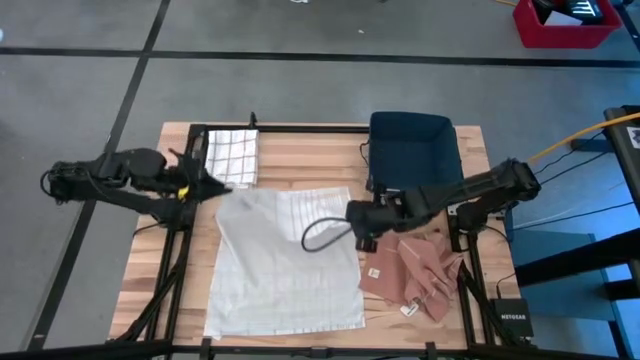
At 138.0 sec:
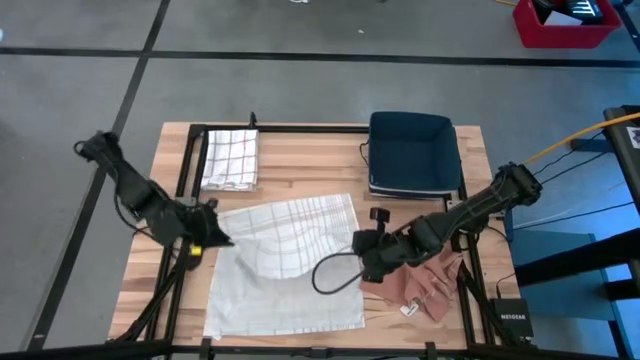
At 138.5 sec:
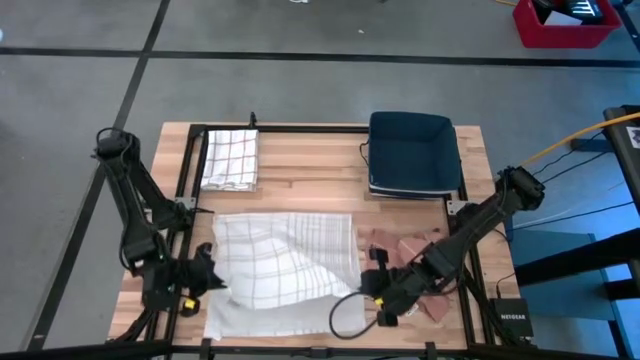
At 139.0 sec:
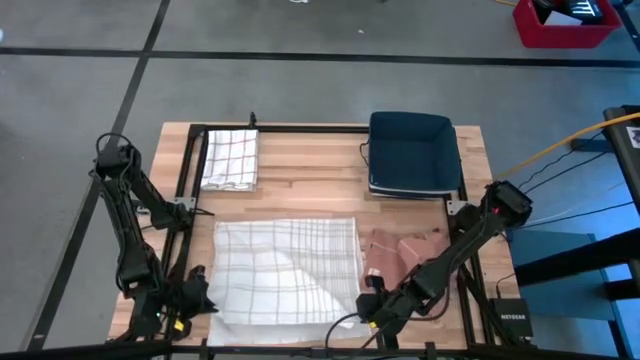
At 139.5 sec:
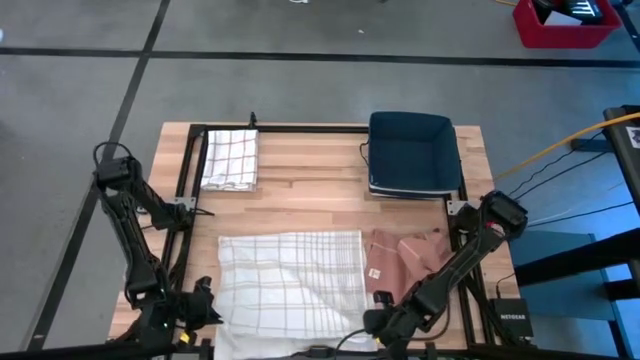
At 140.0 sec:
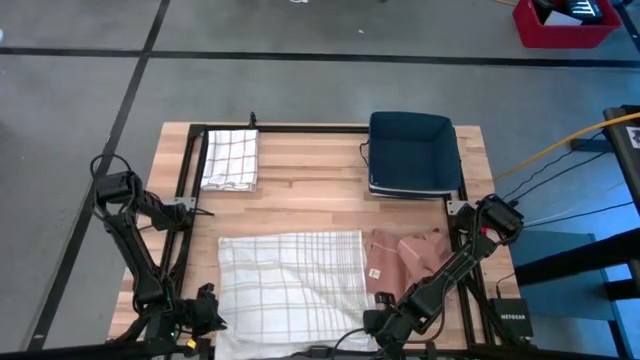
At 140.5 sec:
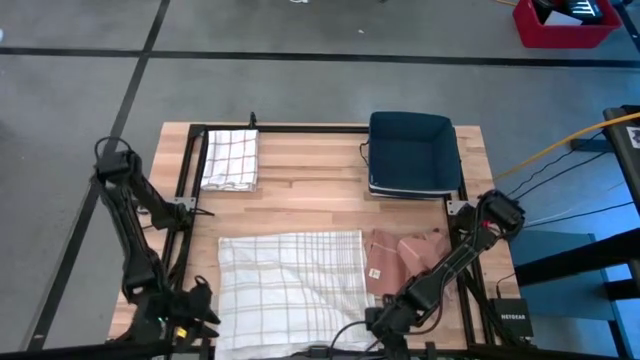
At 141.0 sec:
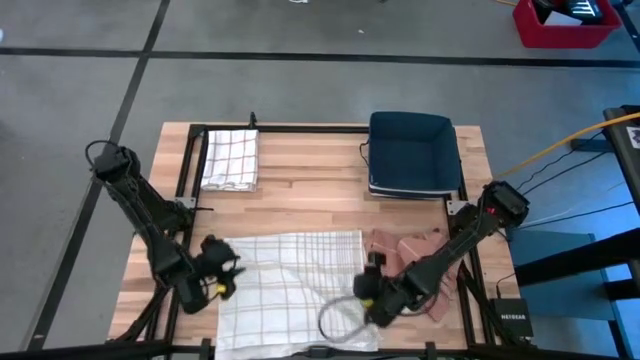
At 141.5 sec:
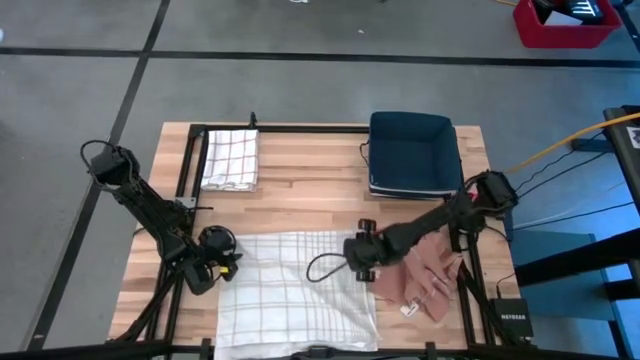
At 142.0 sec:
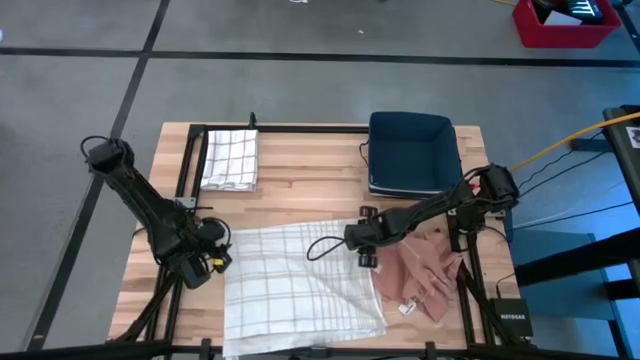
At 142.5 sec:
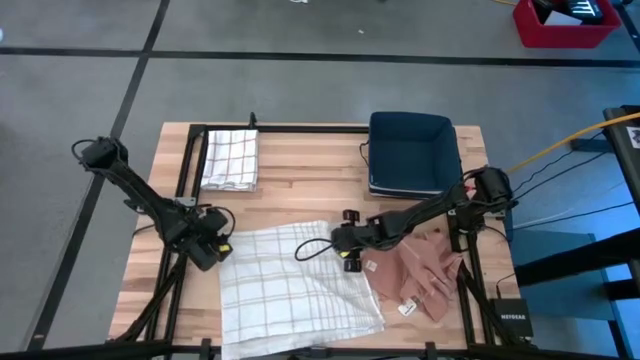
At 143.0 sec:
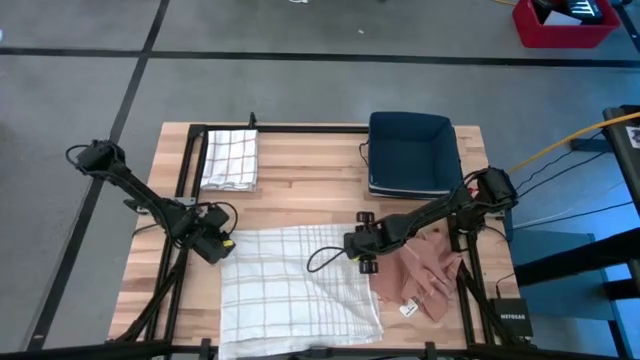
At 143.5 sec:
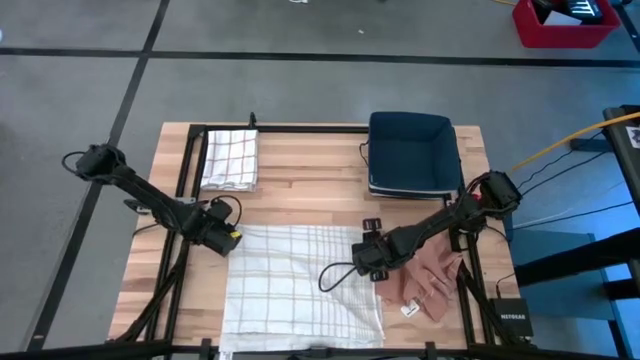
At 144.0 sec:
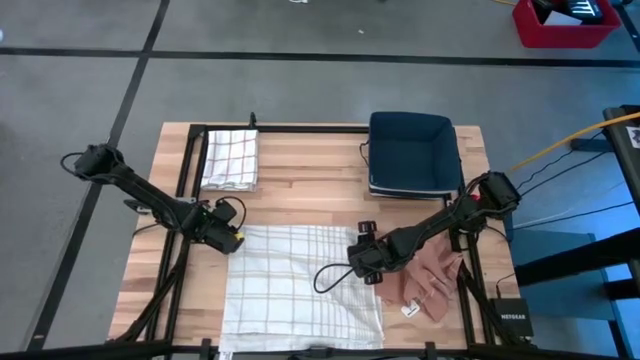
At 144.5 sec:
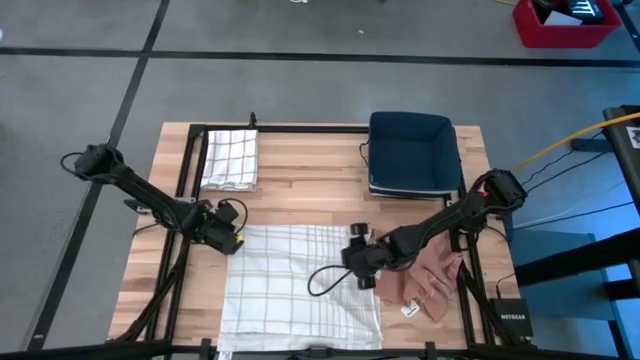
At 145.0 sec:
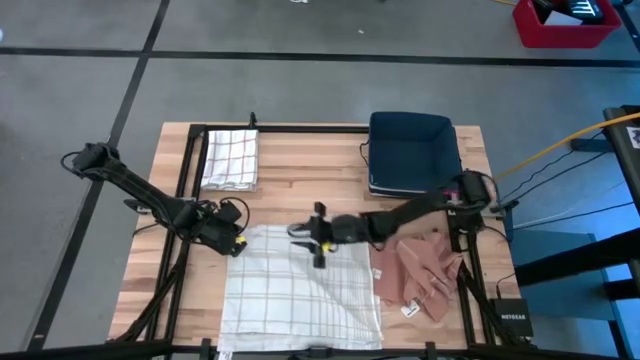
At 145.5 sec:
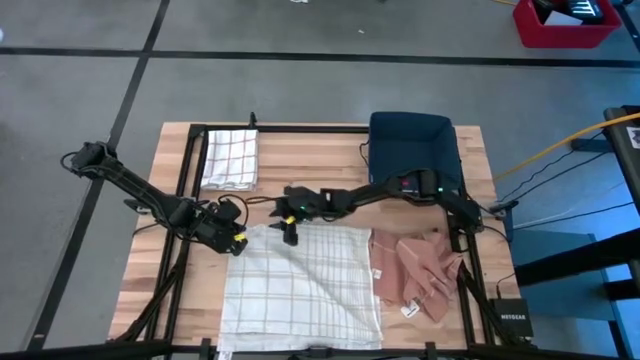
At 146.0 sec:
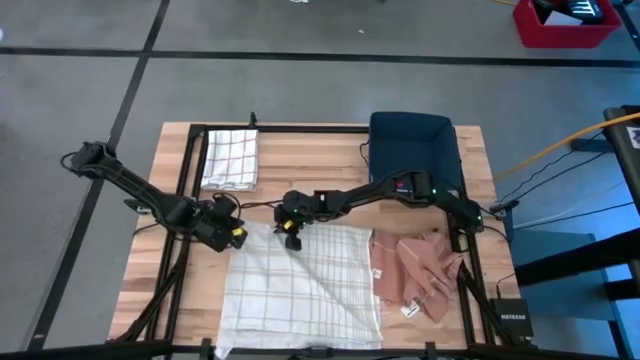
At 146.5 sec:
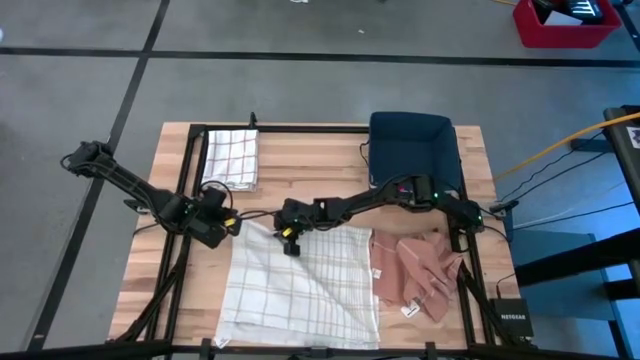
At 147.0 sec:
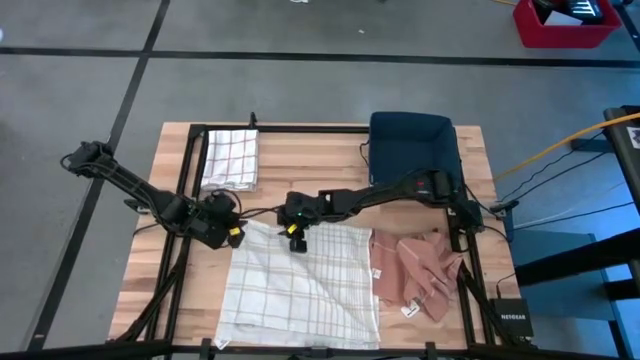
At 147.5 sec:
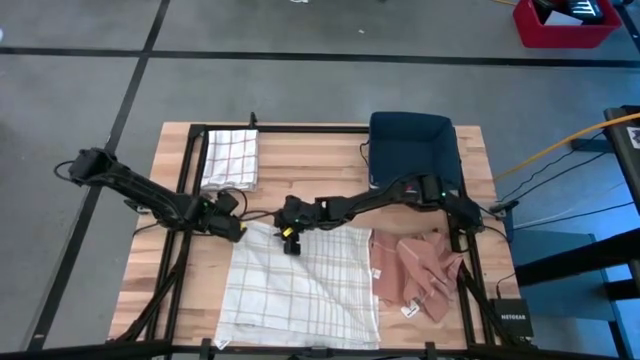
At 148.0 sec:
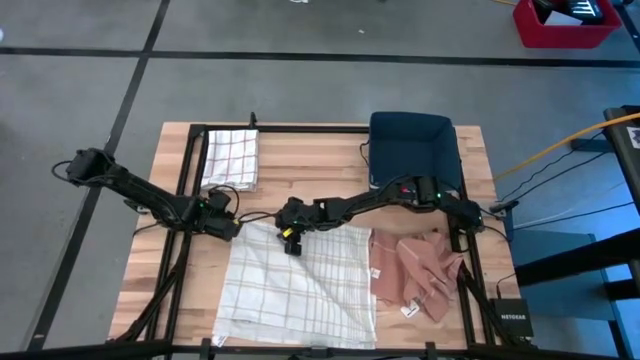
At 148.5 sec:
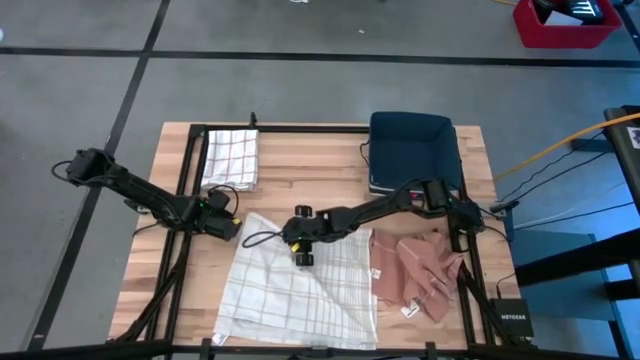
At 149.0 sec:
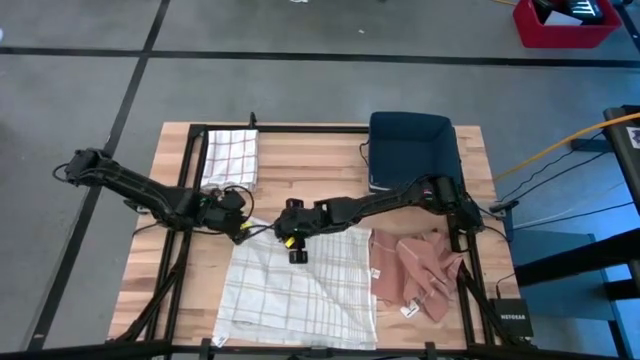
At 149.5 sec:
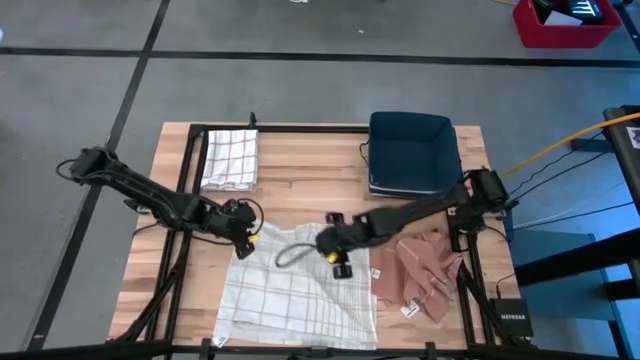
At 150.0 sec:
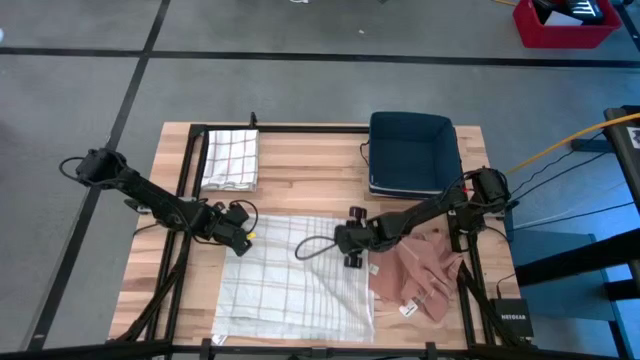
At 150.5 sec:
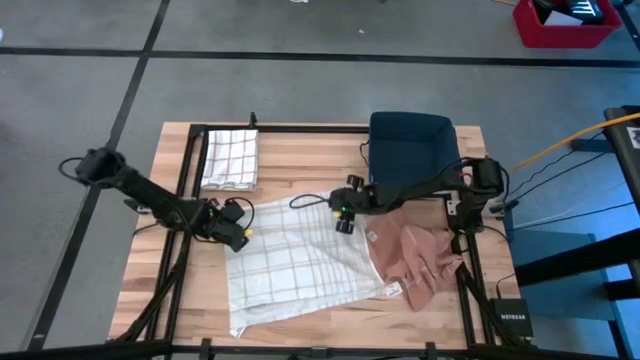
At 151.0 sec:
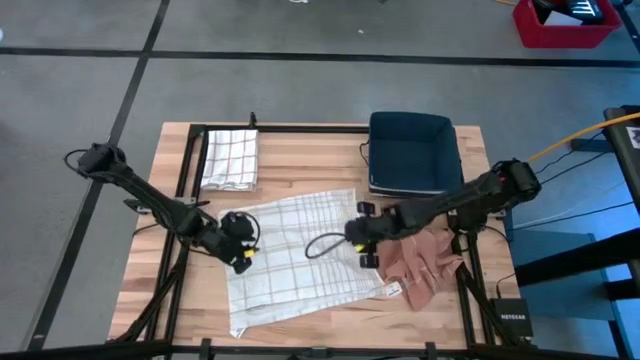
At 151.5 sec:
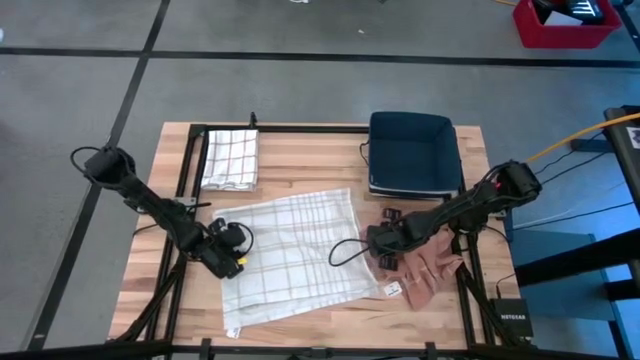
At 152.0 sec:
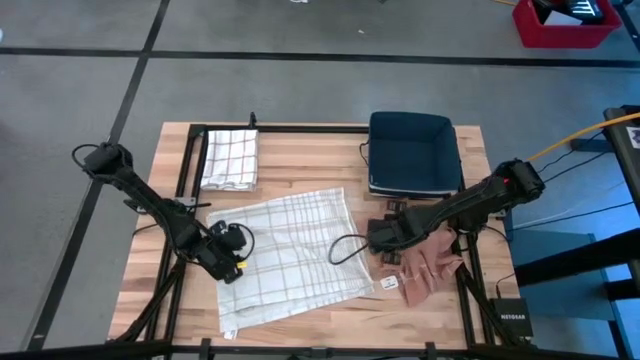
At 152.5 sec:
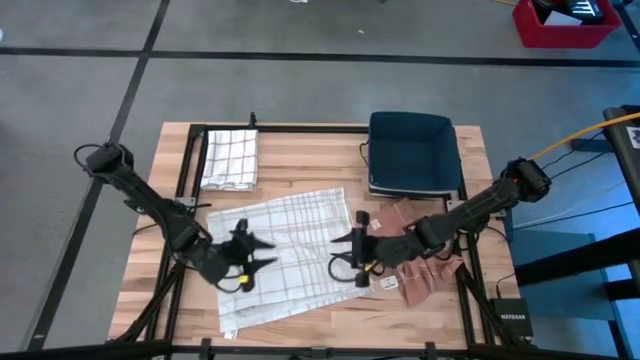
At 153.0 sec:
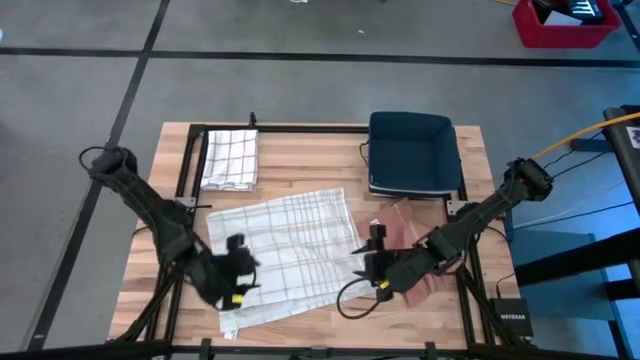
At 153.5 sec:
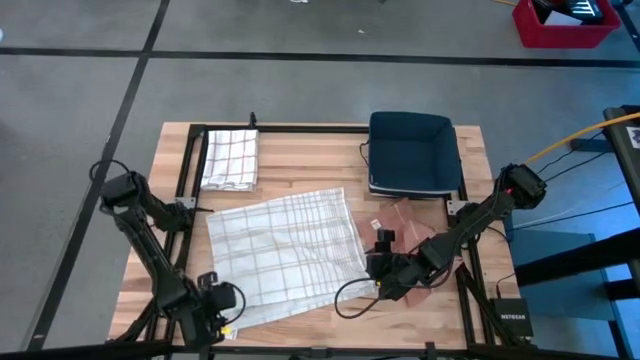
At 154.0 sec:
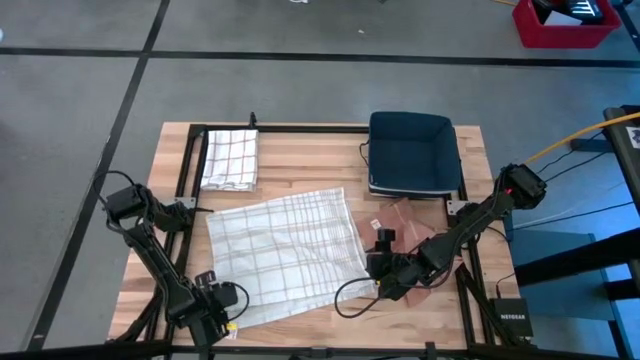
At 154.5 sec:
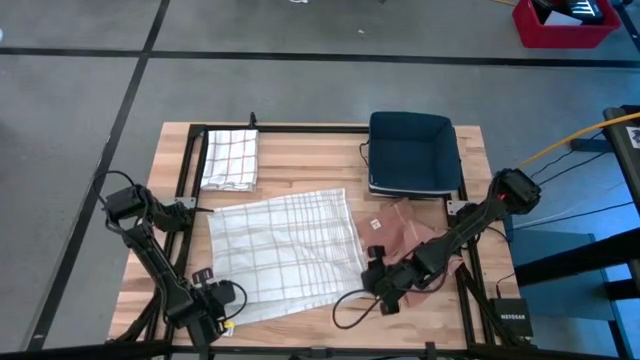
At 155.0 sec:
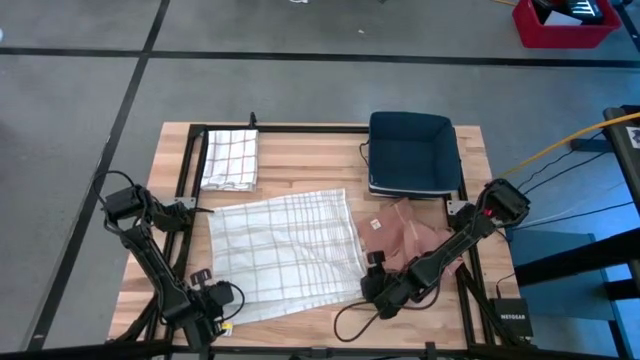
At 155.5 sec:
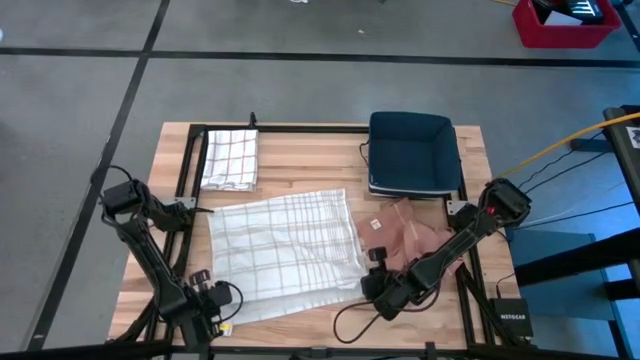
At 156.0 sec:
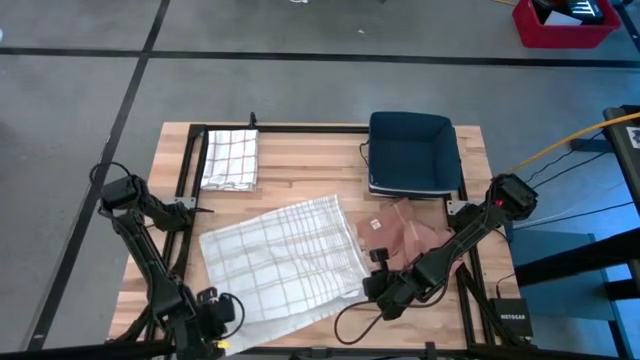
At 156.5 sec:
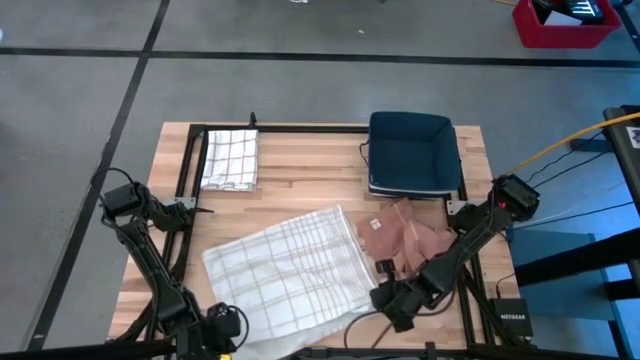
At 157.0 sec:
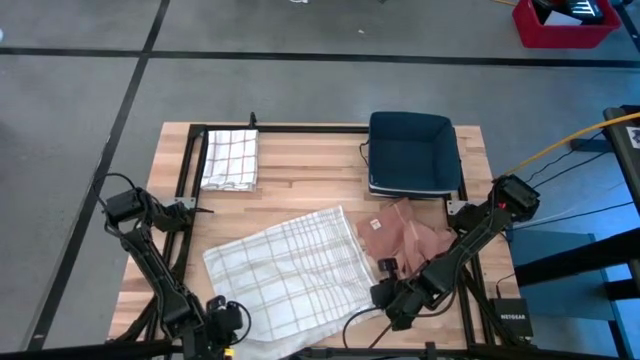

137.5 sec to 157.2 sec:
Task: Fold towel
Fold the white towel on the table
